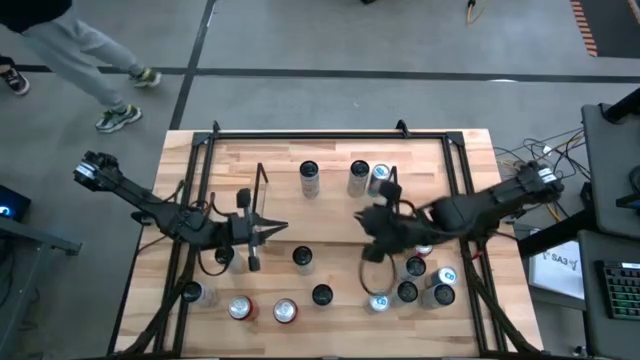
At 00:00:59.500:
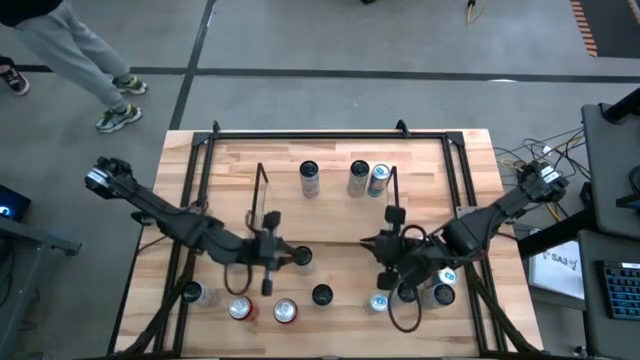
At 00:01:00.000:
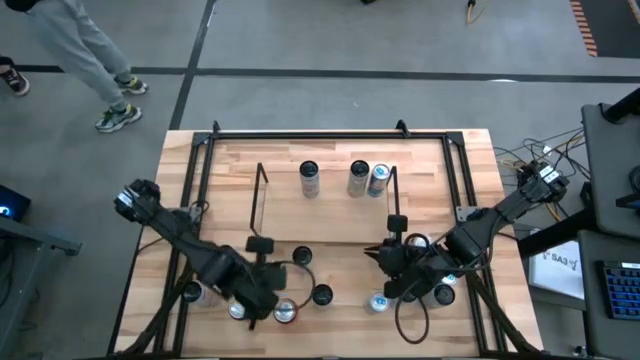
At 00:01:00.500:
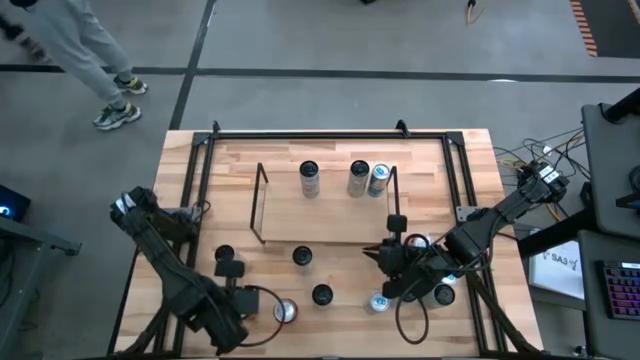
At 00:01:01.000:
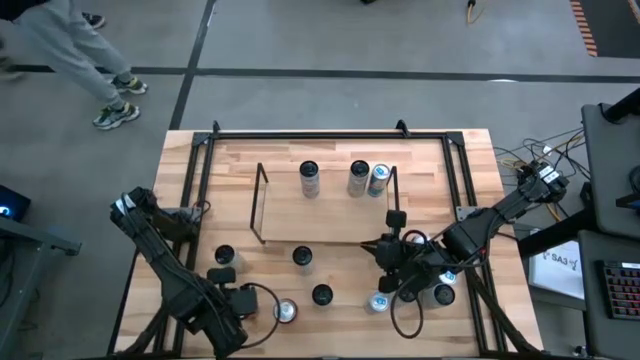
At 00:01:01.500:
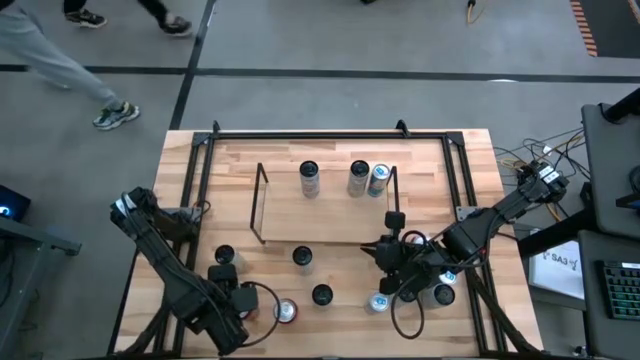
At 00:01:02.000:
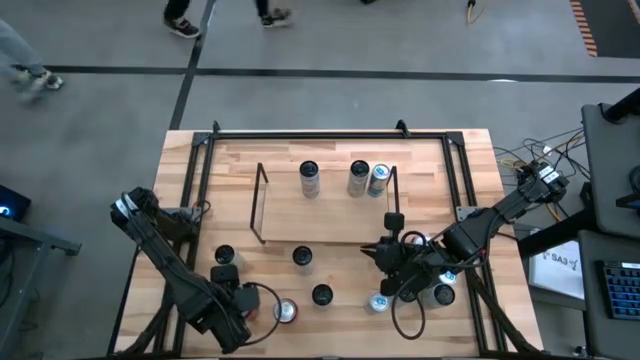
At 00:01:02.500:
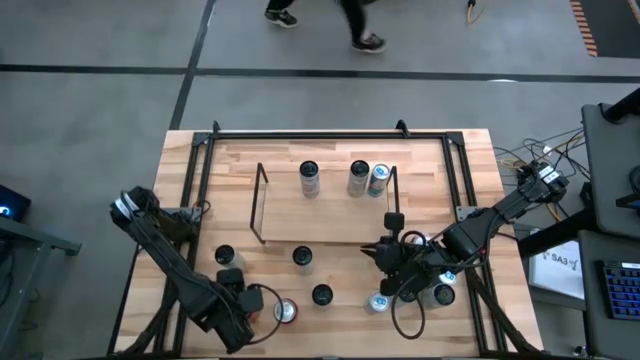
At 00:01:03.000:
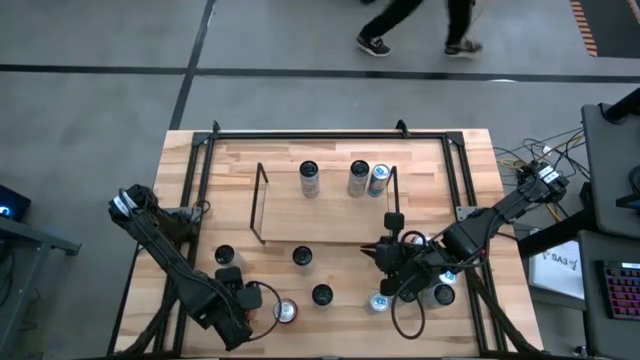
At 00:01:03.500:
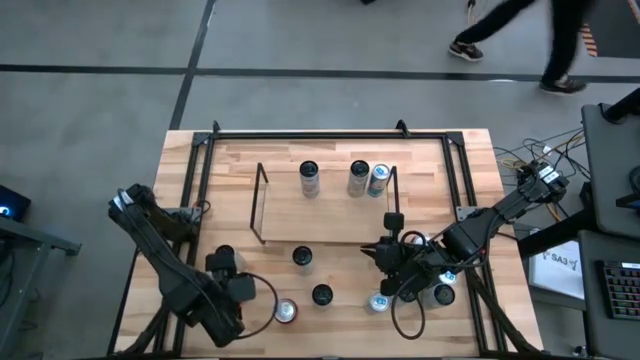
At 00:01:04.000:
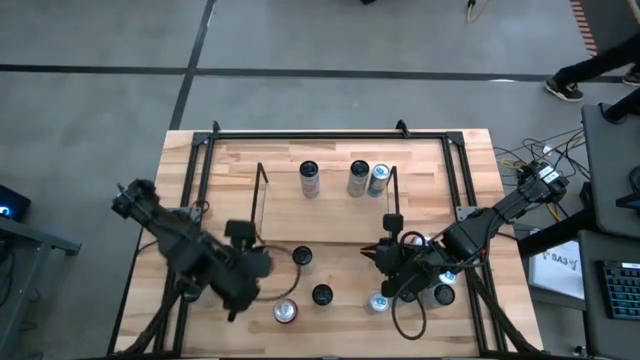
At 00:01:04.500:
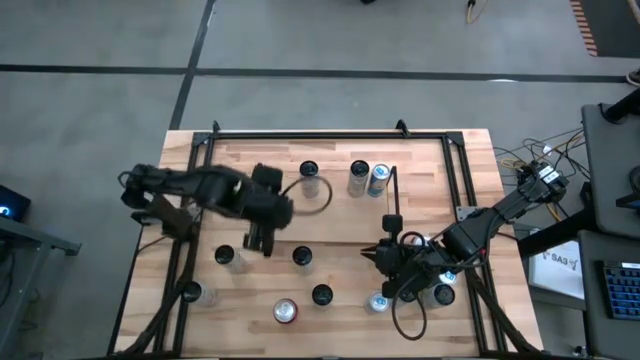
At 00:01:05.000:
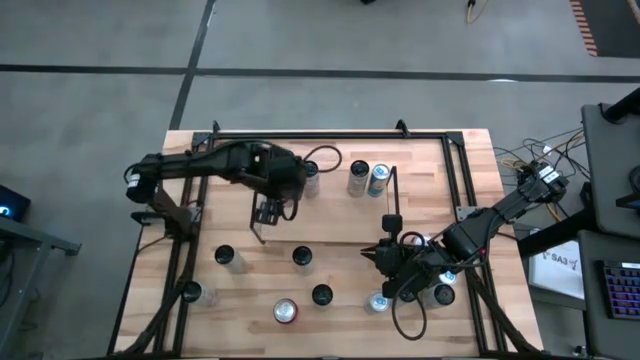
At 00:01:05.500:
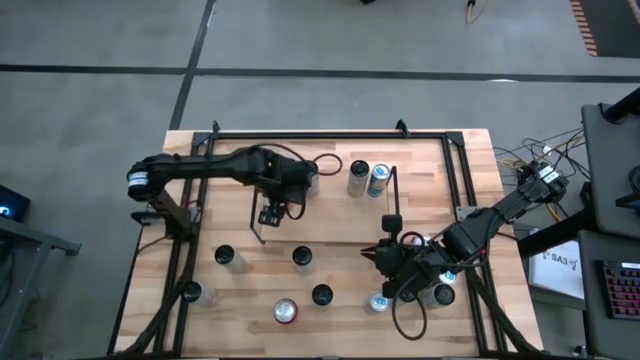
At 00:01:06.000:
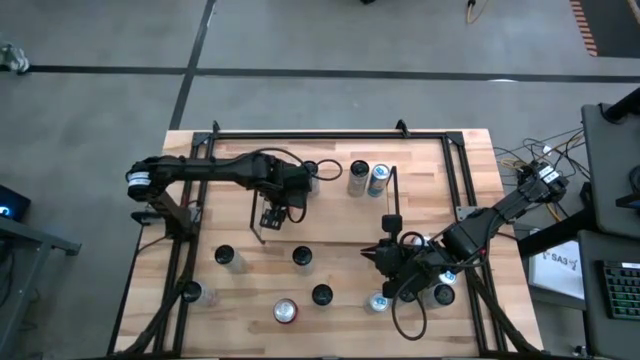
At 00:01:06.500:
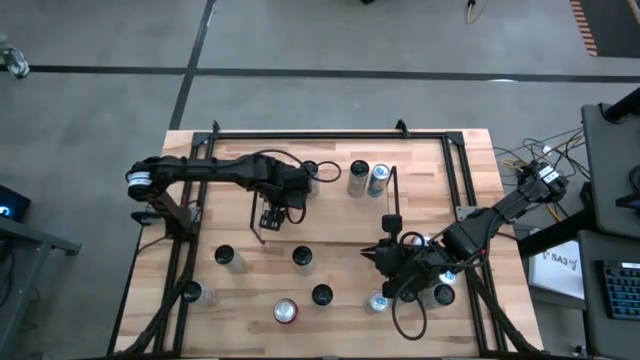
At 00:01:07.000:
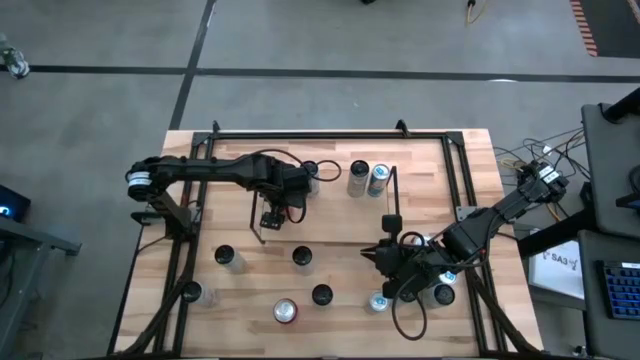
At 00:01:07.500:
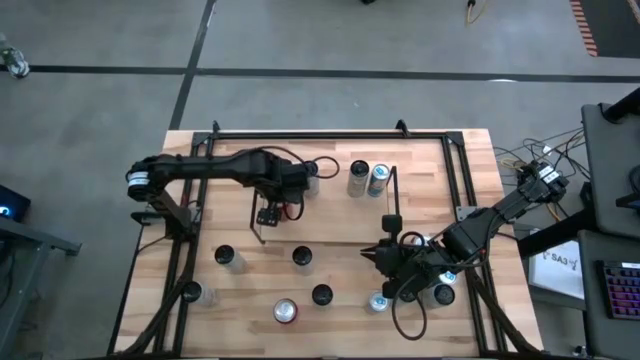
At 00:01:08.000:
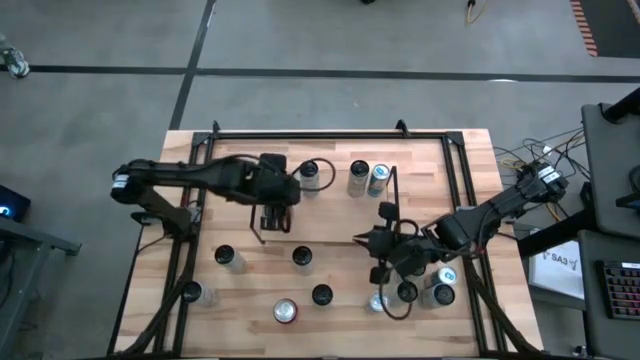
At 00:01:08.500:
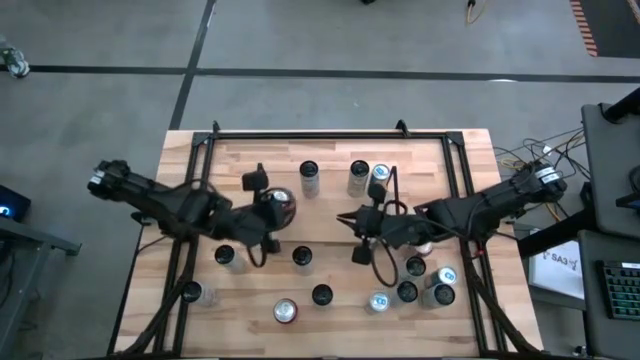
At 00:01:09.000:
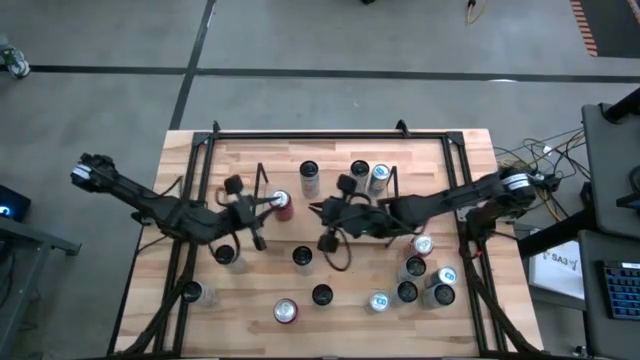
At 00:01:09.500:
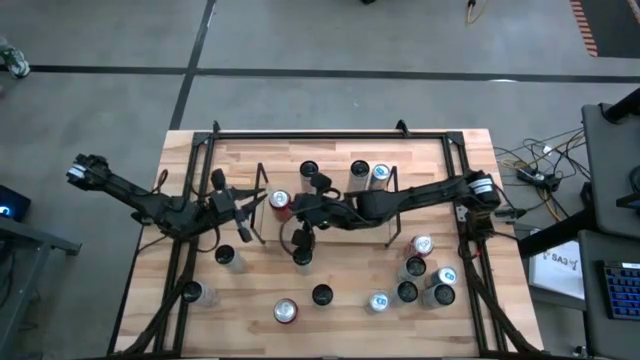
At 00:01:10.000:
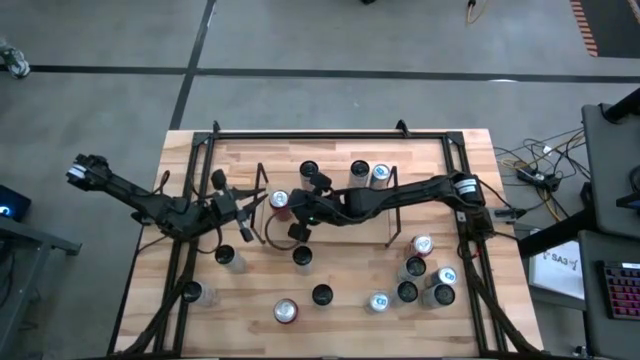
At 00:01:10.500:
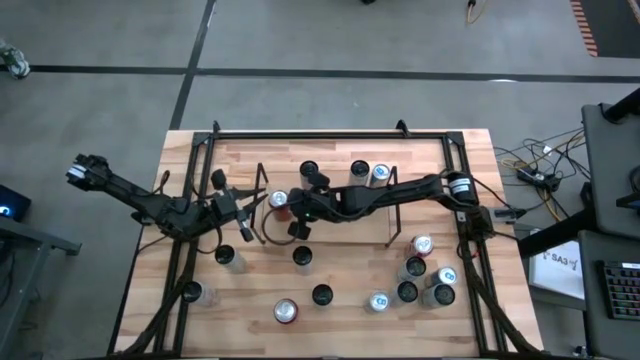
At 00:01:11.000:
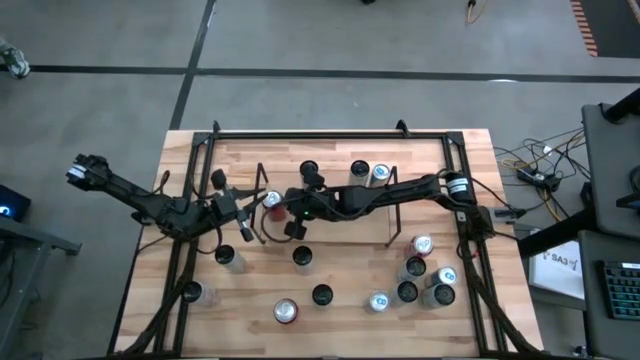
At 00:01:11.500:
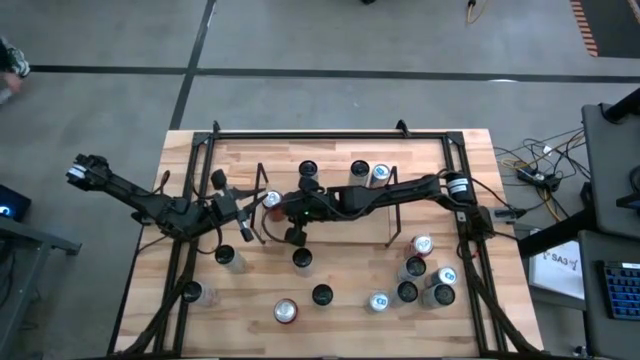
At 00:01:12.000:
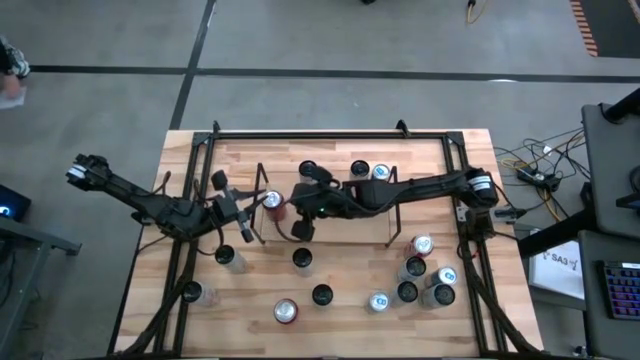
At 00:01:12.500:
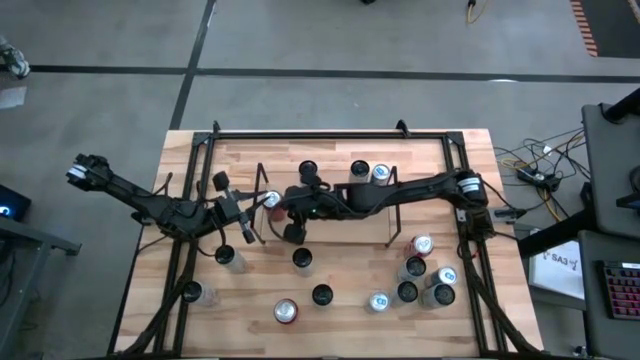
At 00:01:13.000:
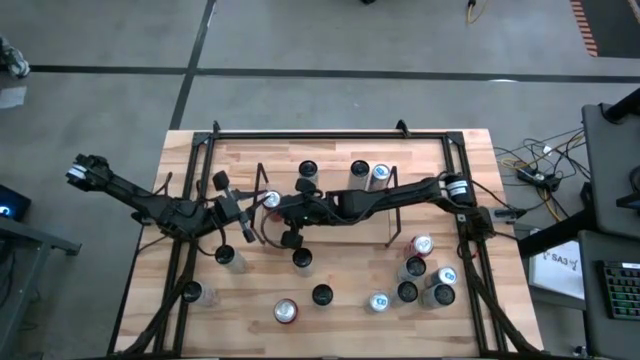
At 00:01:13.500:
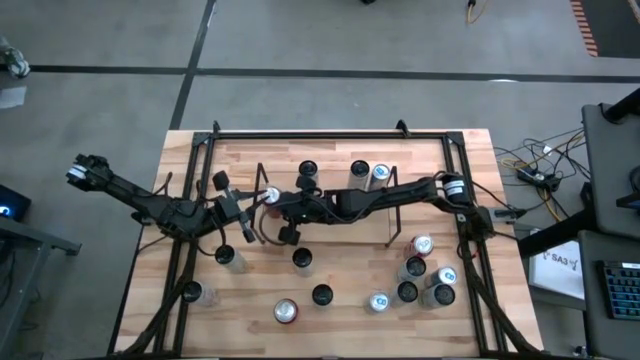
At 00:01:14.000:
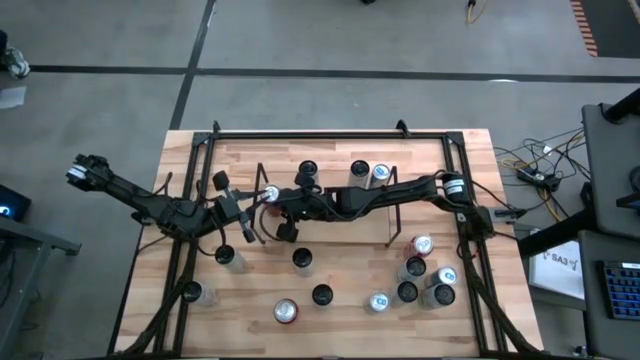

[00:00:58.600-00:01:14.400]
Task: Place canned beverage on shelf
Put the left red and black soda can on the shelf

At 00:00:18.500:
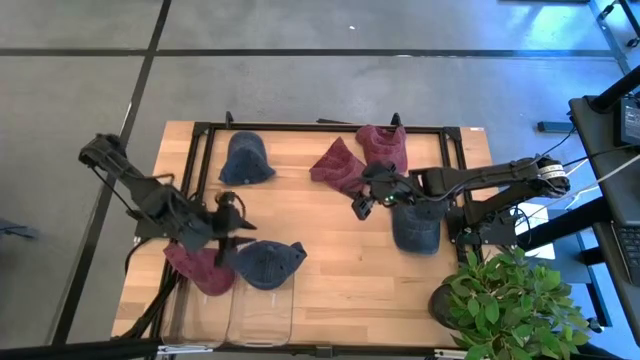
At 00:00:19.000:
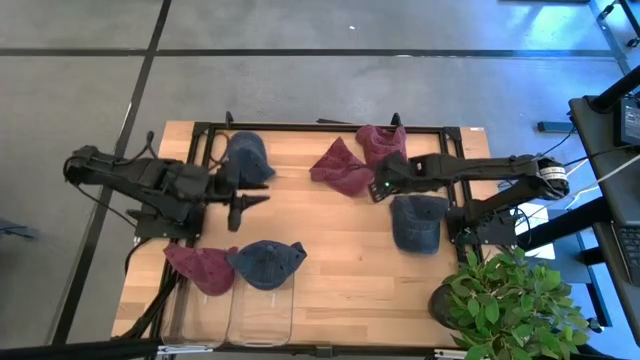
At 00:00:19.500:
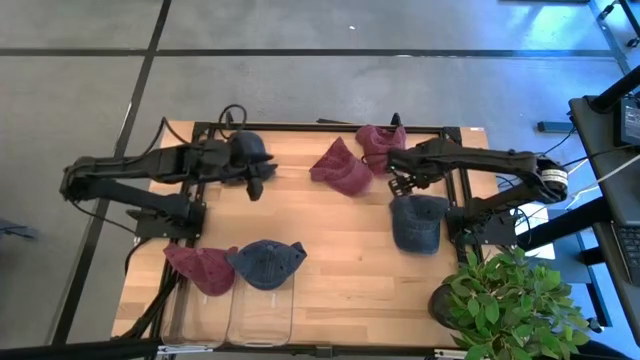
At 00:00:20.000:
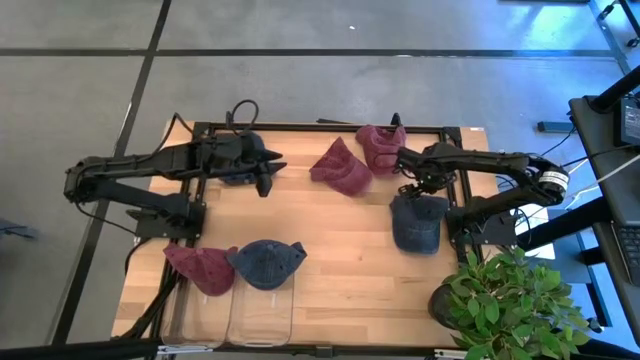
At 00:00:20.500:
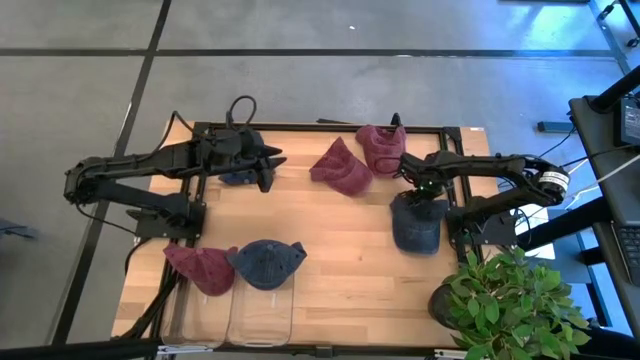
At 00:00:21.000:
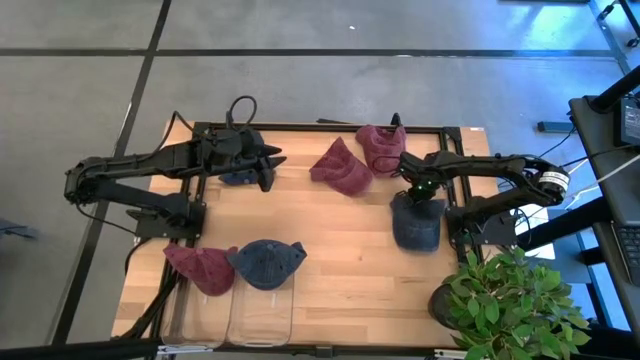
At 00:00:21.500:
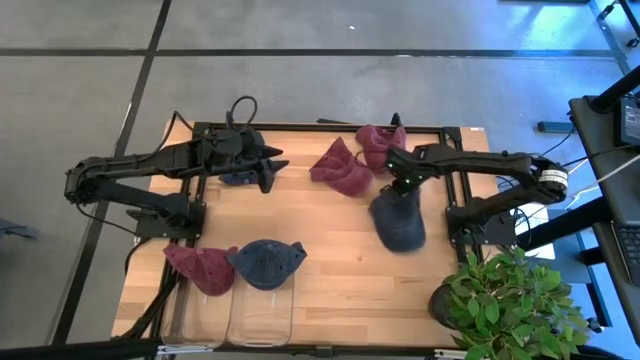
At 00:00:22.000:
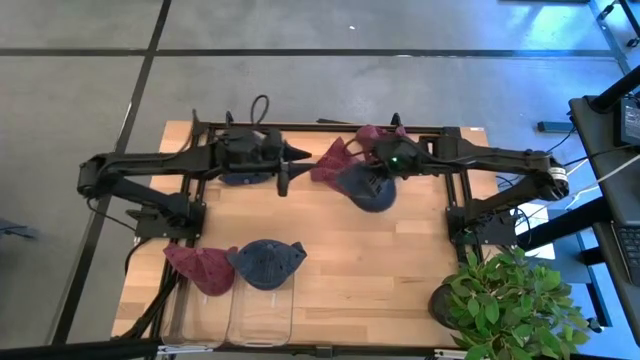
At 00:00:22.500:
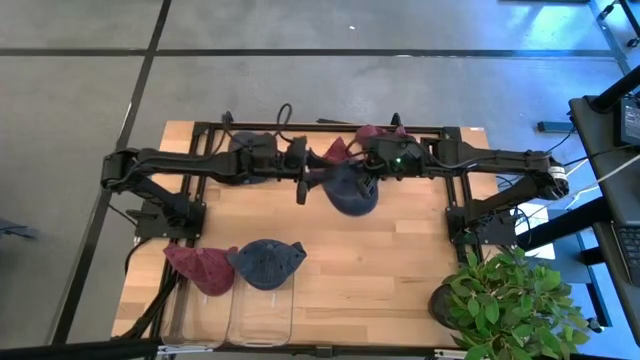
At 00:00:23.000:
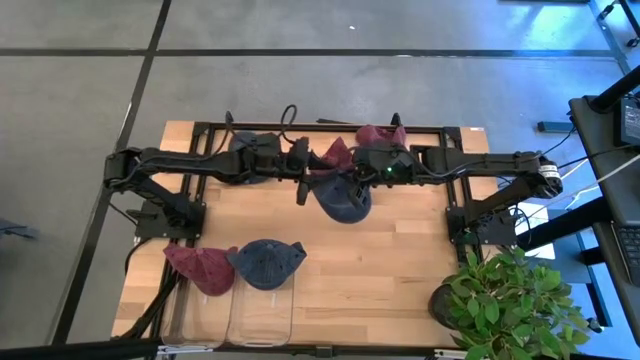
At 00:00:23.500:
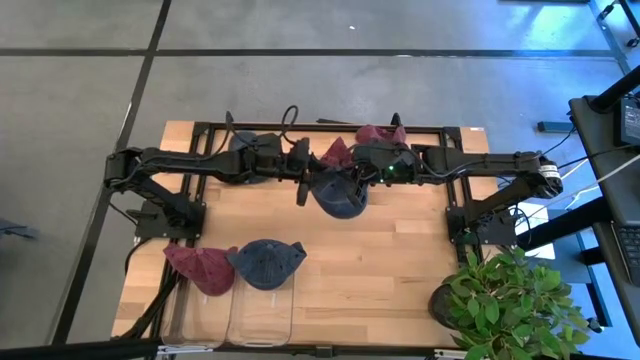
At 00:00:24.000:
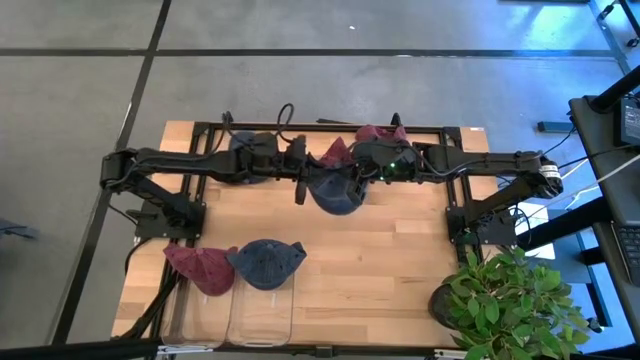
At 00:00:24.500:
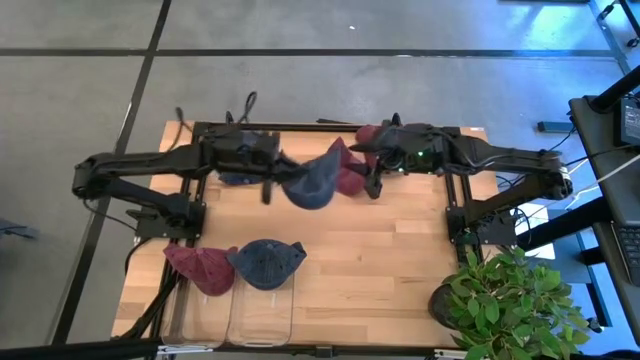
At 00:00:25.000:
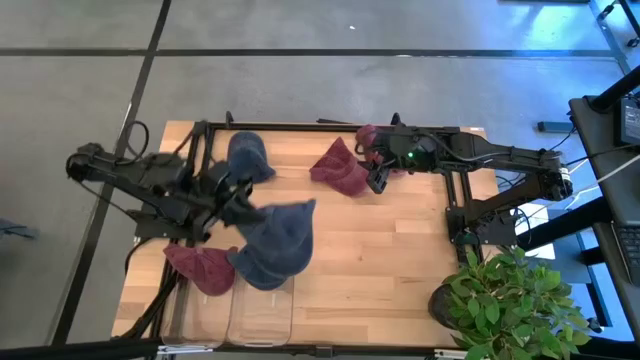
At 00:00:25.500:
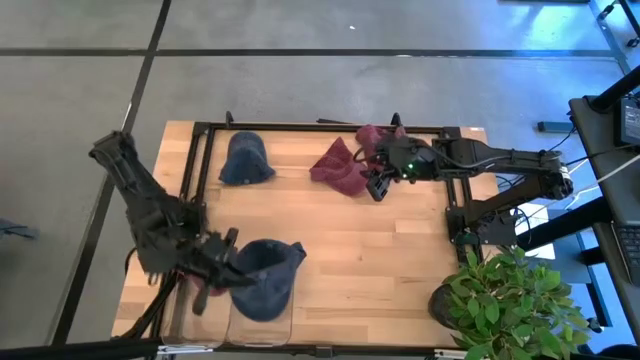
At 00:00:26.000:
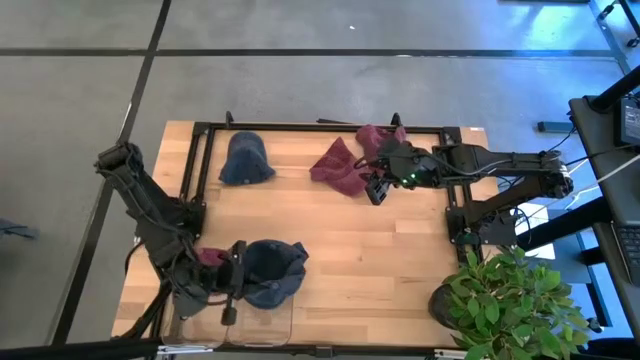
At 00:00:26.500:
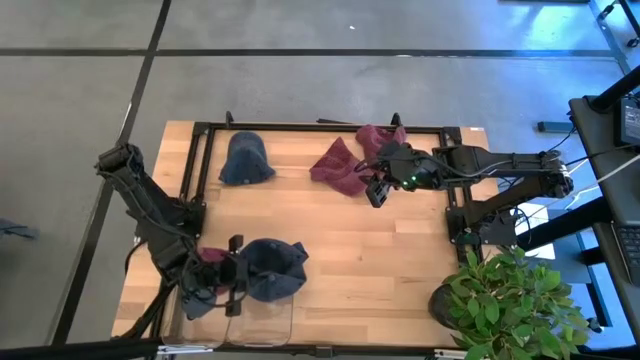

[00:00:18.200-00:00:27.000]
Task: Pick & Place hat
Put the bottom blue cap into the right transparent bin
